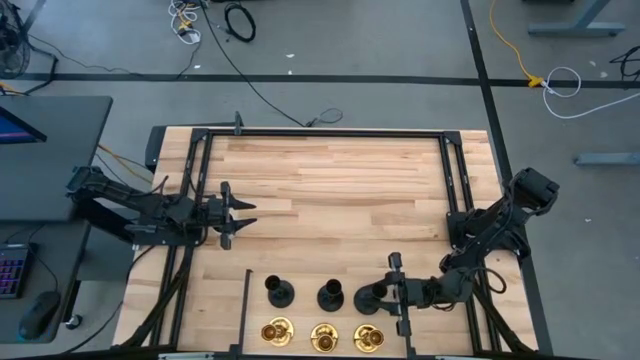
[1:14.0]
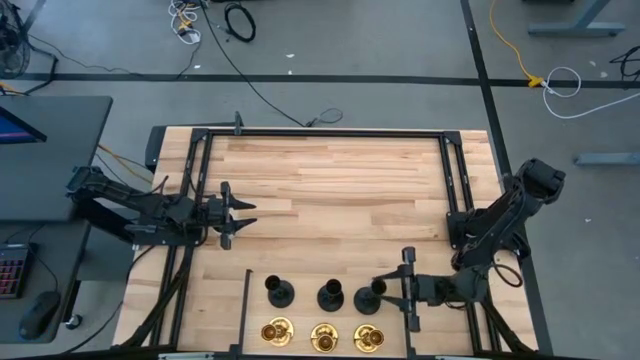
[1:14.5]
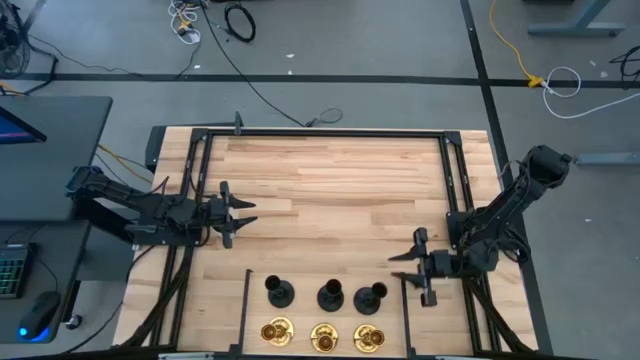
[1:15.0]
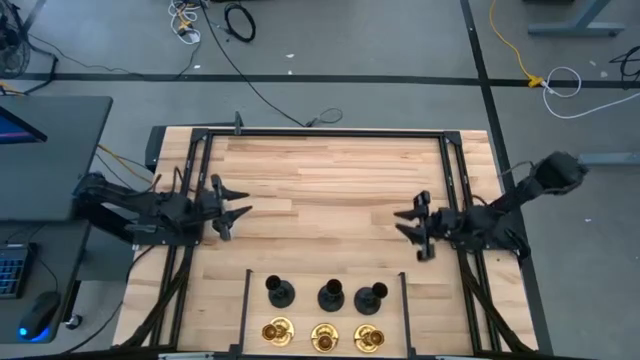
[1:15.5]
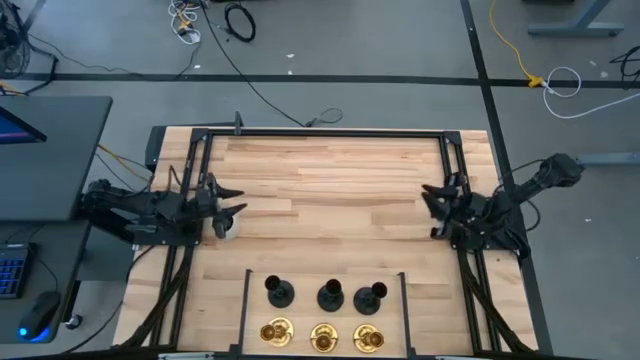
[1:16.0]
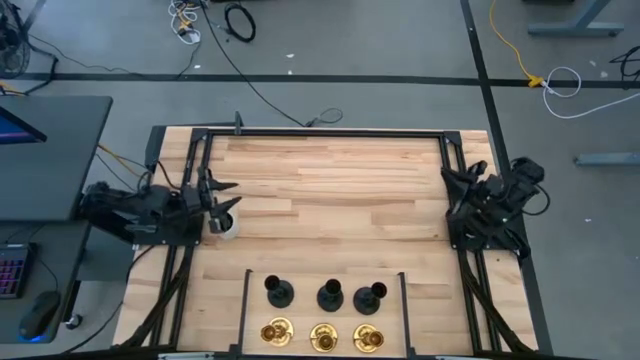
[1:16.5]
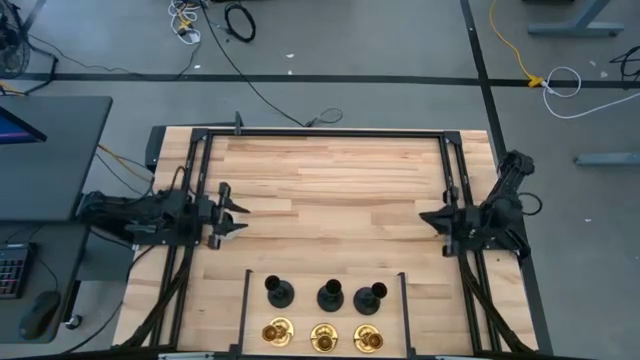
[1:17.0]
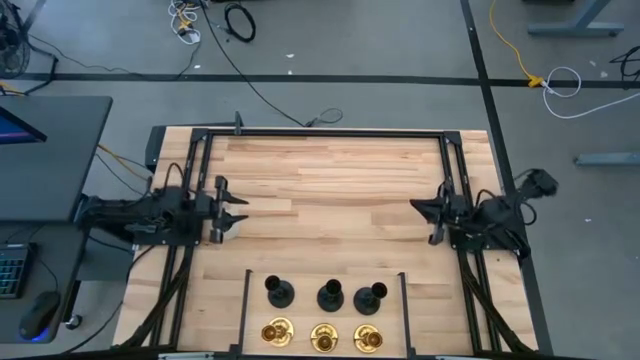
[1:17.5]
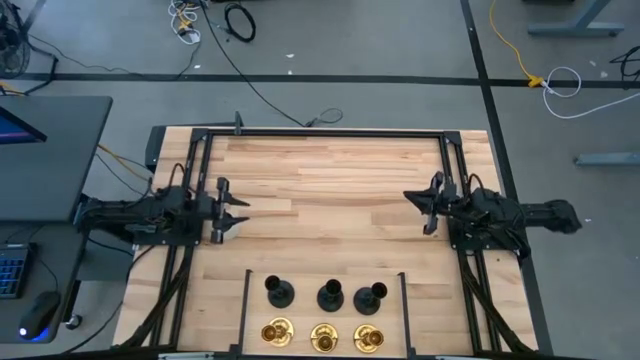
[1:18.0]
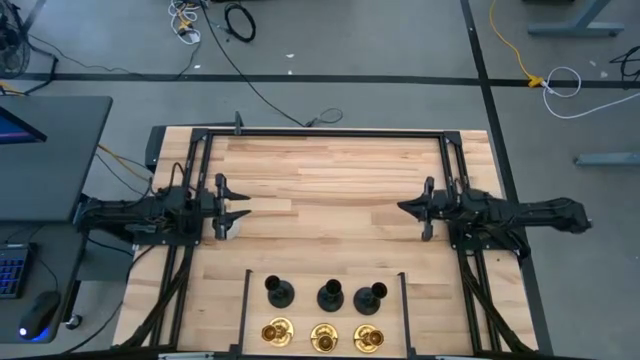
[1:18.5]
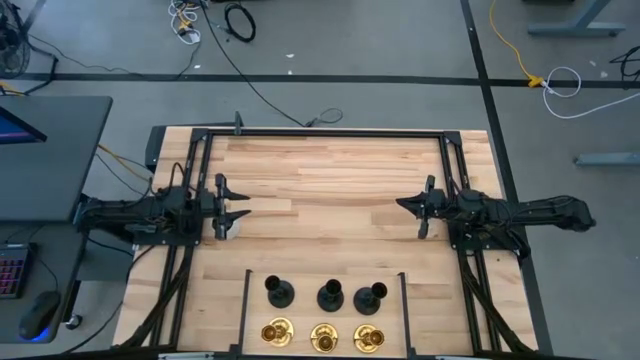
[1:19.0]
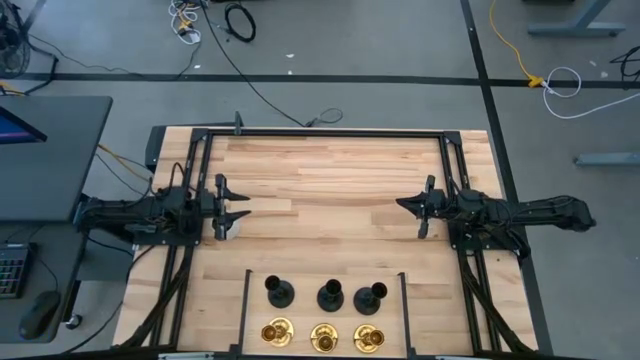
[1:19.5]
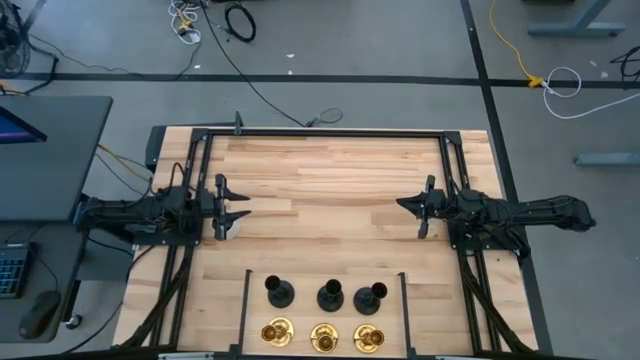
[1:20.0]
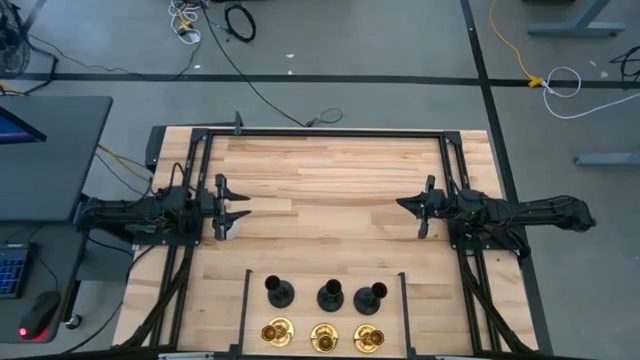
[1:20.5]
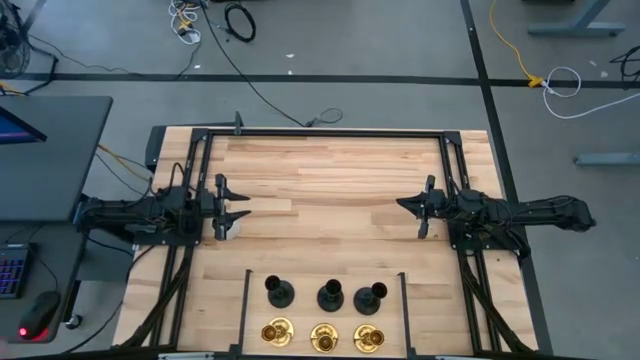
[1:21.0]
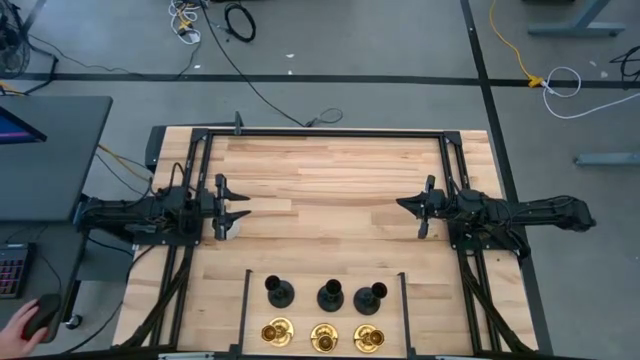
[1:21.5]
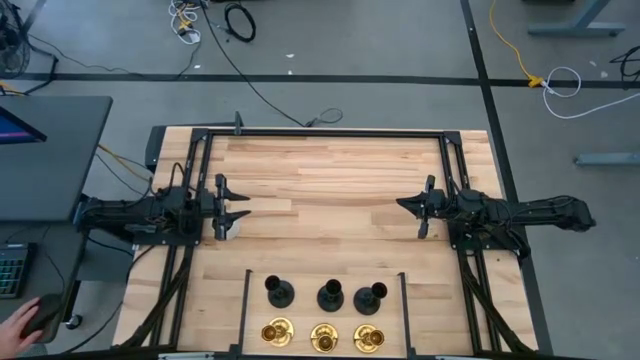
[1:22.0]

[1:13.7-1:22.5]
Task: Pick & Place candle stick holders
Return to Home Position
